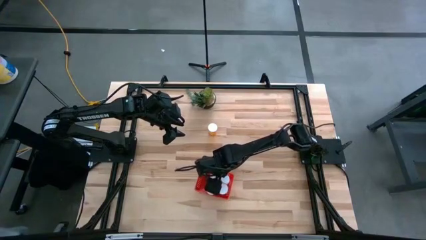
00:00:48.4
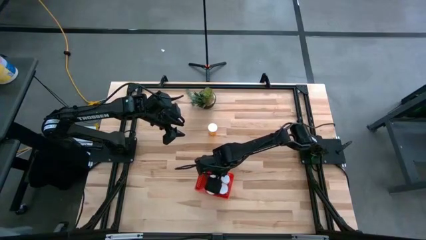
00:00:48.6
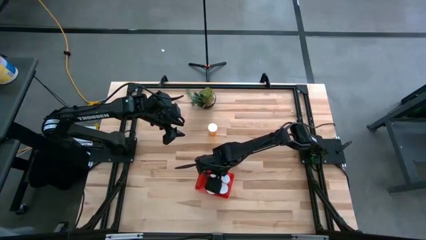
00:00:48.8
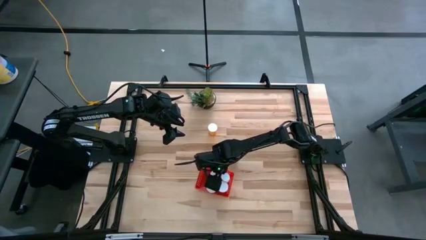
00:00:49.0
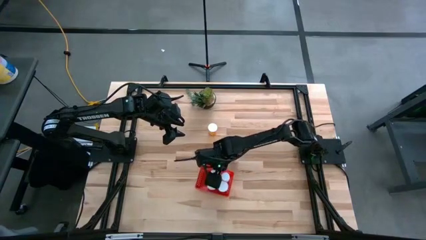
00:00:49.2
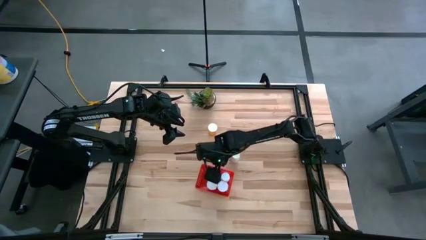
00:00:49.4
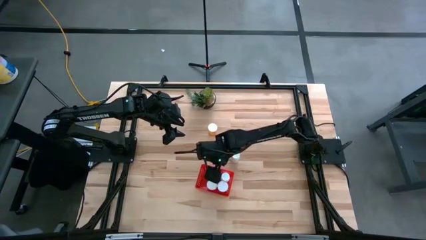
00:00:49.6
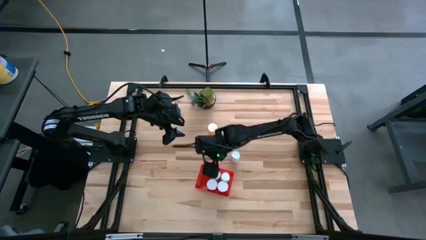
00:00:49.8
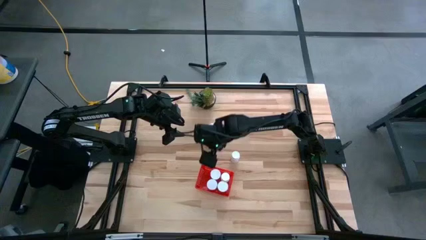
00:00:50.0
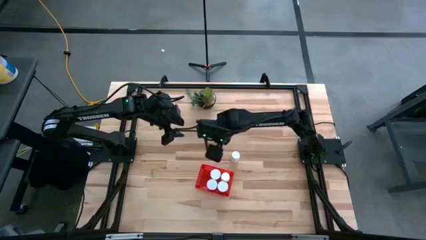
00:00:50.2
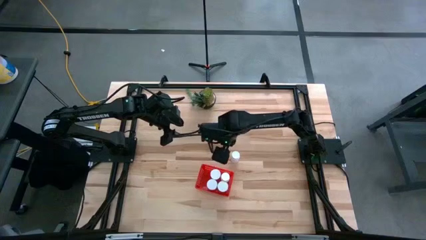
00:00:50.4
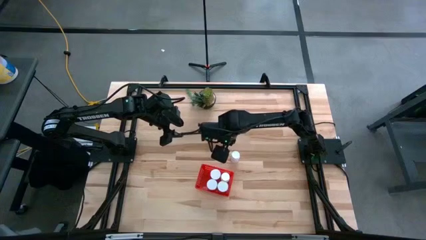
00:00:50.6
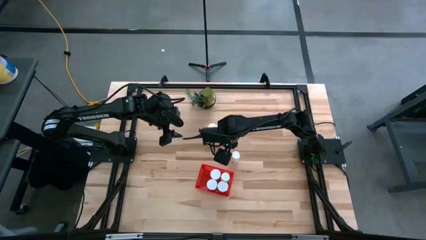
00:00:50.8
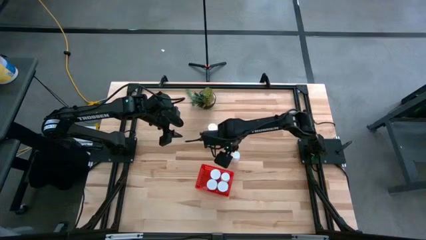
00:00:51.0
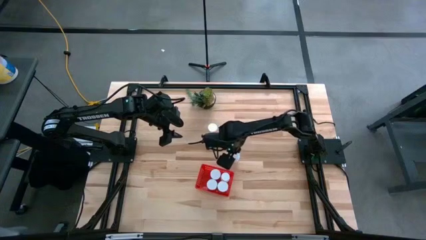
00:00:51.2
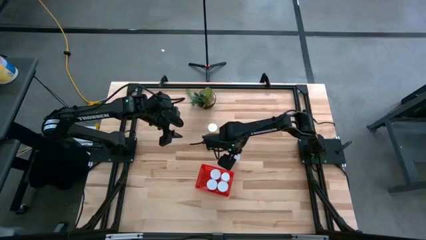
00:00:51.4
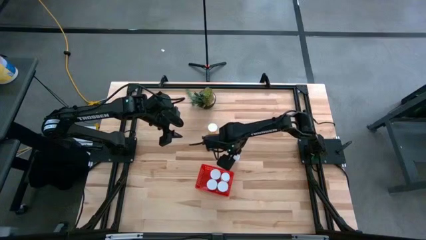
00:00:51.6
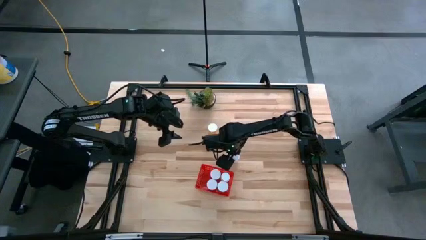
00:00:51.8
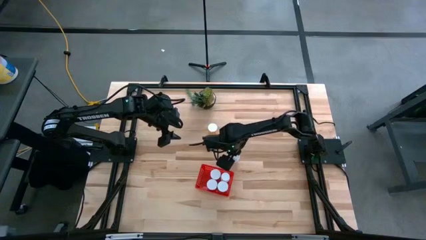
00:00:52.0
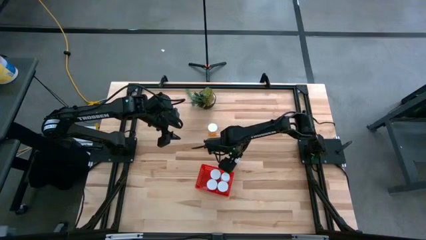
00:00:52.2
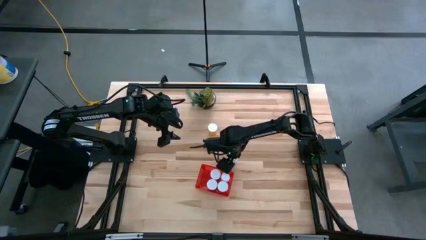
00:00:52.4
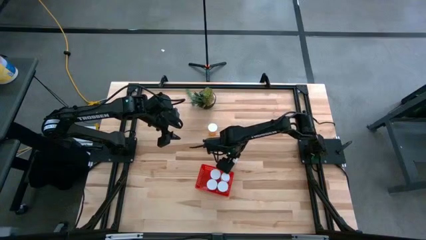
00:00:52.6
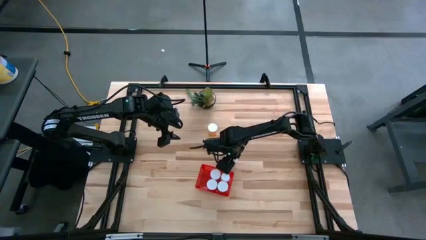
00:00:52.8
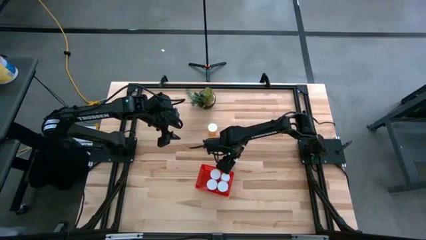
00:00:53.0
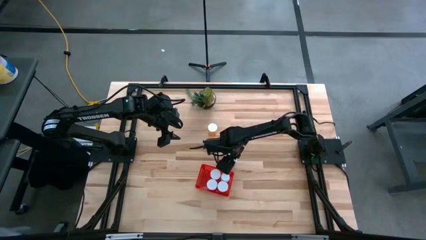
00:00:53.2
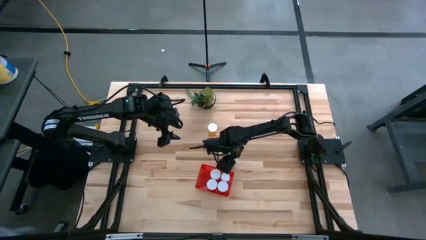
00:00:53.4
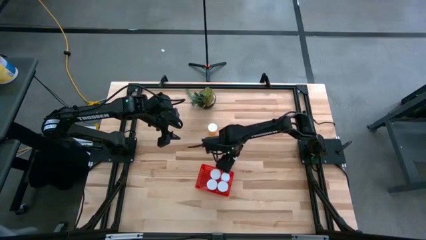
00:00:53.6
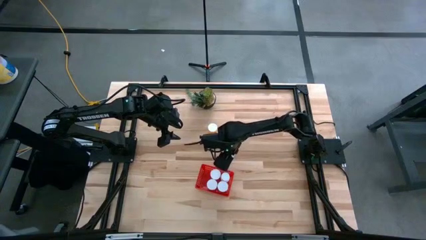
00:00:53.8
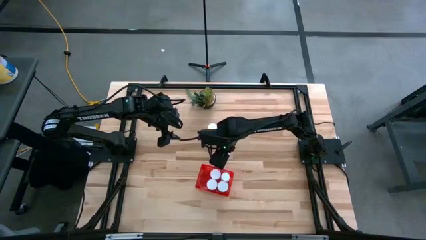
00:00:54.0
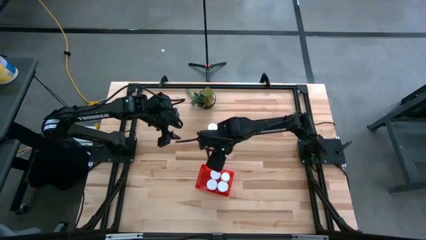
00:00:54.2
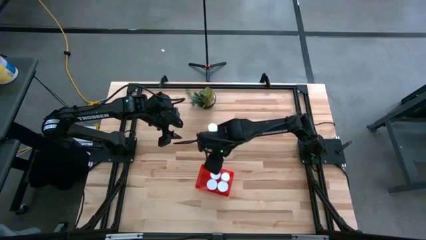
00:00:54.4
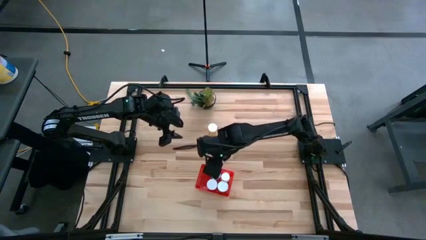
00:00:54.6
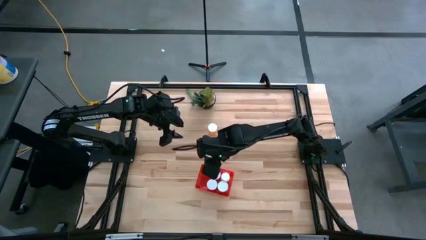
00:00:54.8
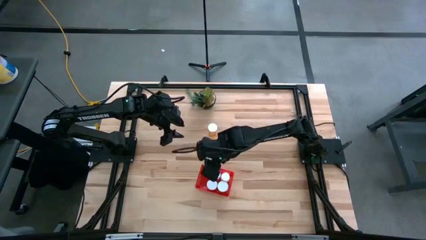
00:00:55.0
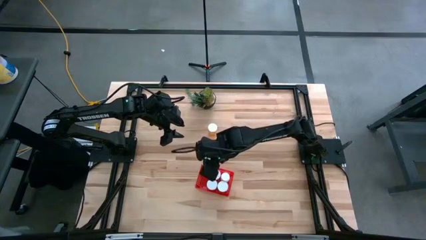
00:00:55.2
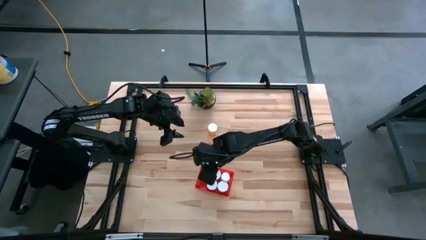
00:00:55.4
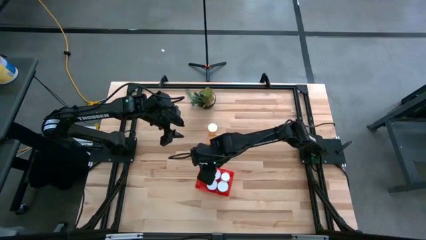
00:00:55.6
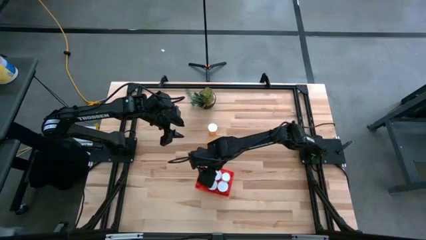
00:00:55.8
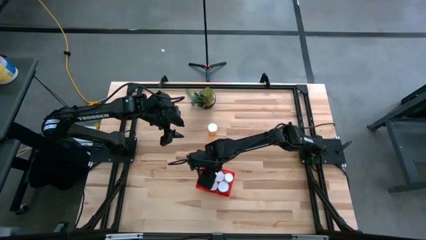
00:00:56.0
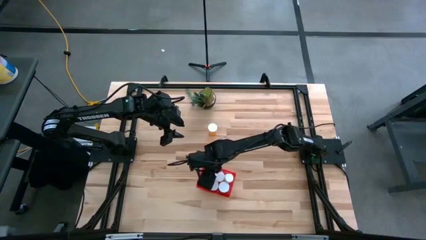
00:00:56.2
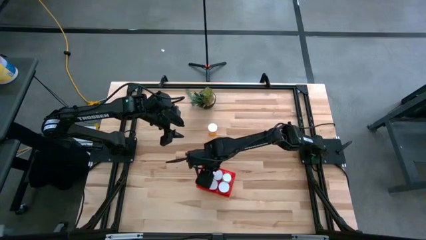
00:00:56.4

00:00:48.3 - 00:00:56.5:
Task: Pick and place pill bottles into a basket
Put the white pill bottle into the basket

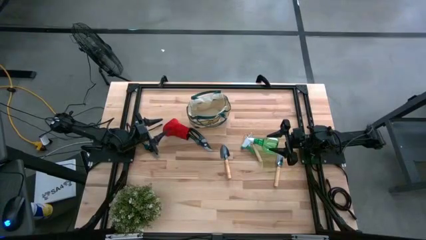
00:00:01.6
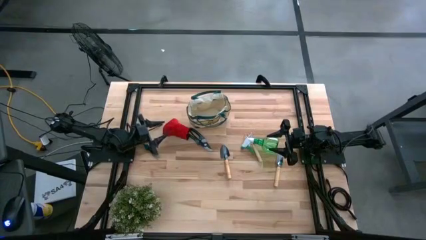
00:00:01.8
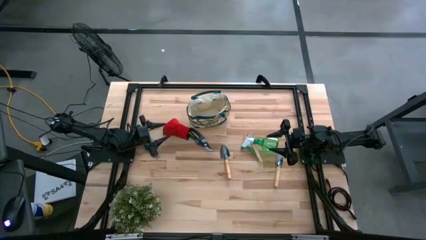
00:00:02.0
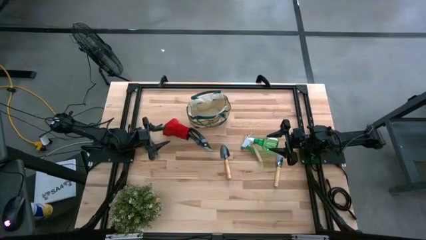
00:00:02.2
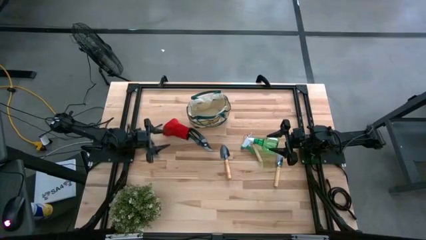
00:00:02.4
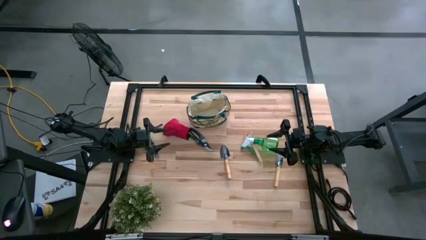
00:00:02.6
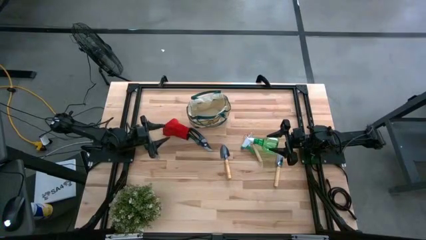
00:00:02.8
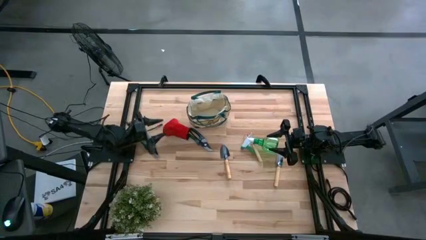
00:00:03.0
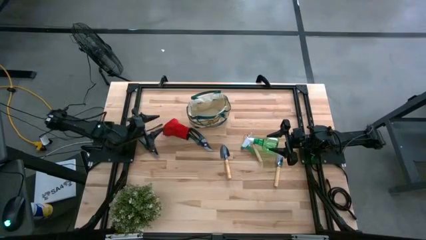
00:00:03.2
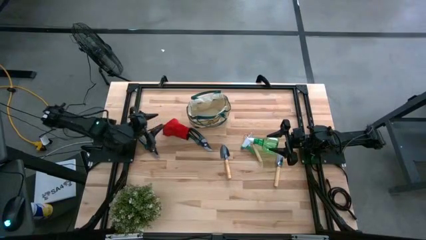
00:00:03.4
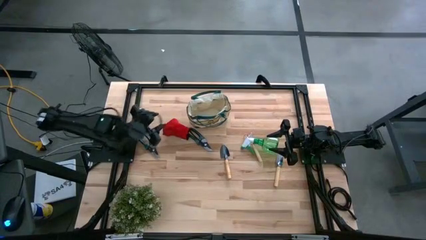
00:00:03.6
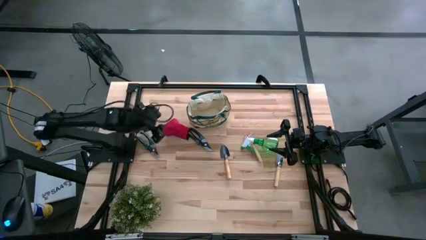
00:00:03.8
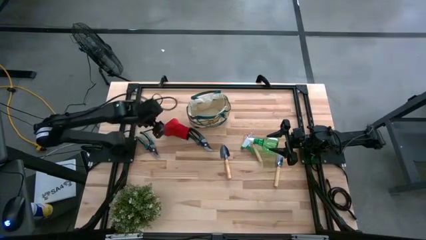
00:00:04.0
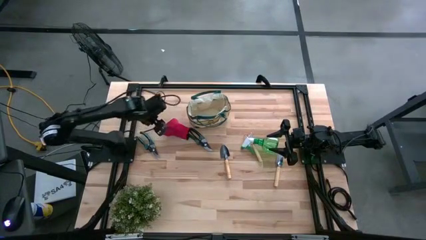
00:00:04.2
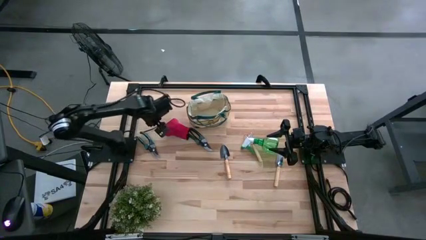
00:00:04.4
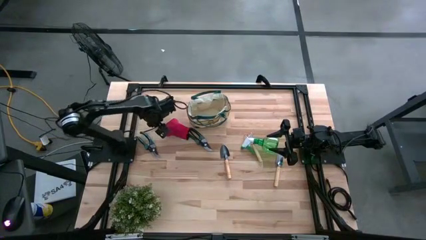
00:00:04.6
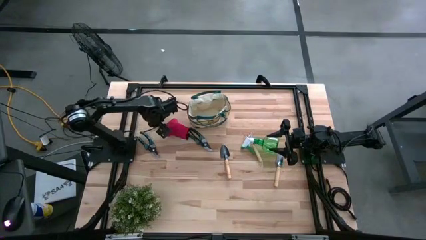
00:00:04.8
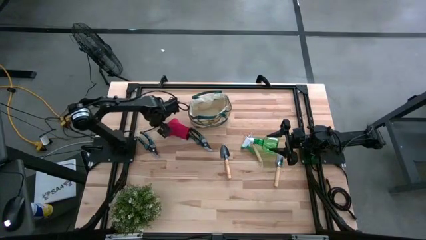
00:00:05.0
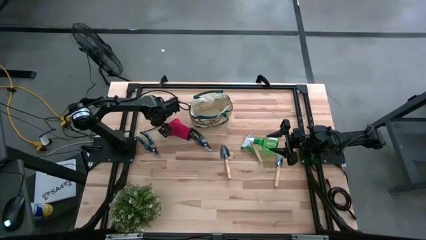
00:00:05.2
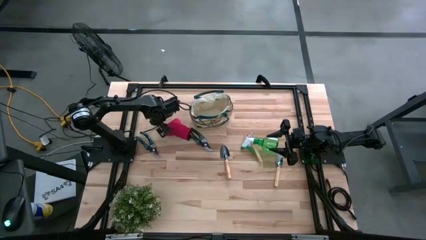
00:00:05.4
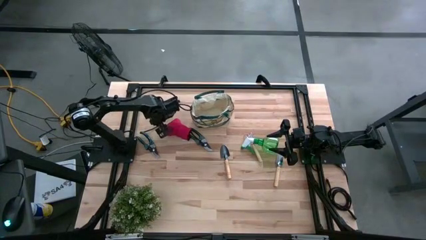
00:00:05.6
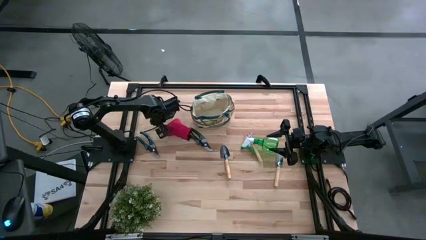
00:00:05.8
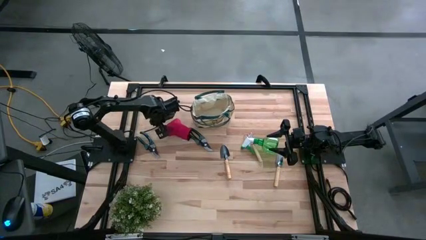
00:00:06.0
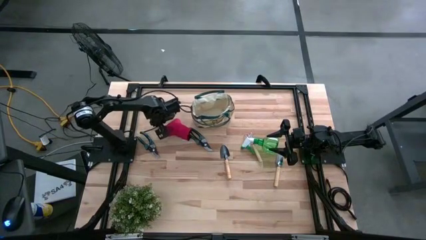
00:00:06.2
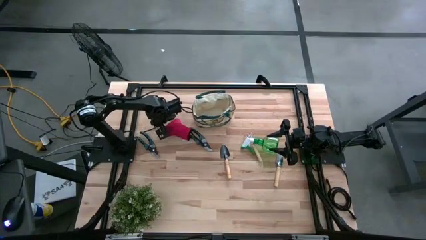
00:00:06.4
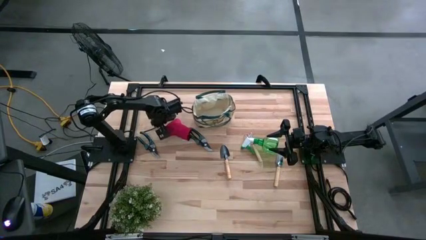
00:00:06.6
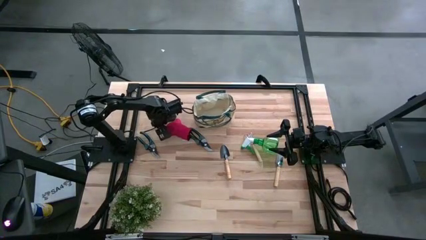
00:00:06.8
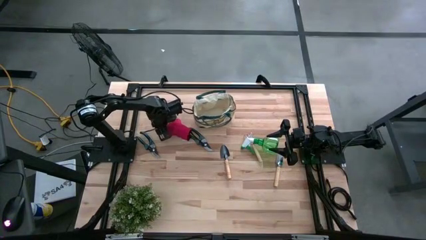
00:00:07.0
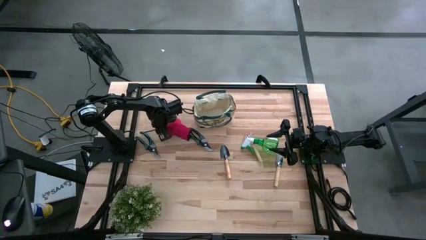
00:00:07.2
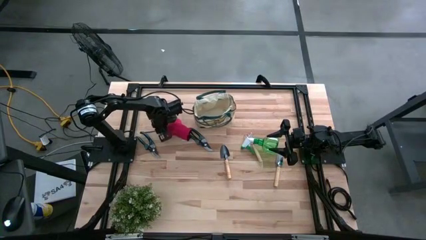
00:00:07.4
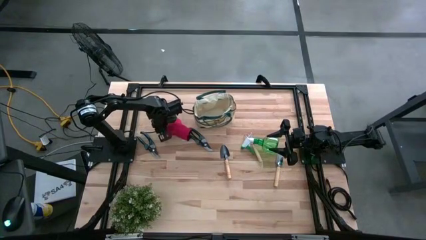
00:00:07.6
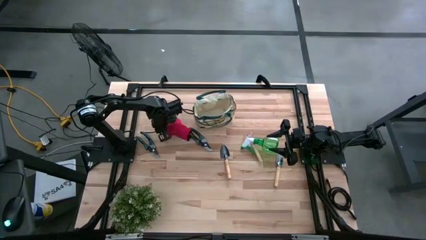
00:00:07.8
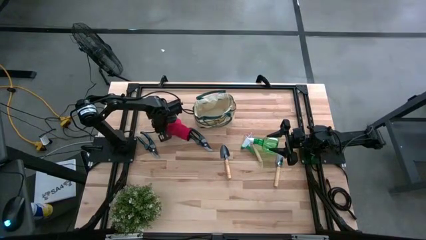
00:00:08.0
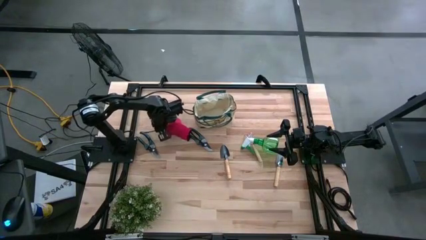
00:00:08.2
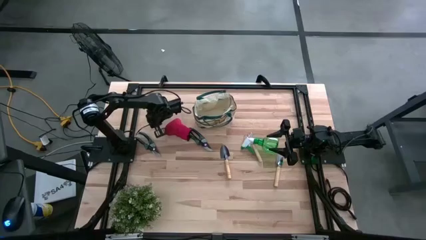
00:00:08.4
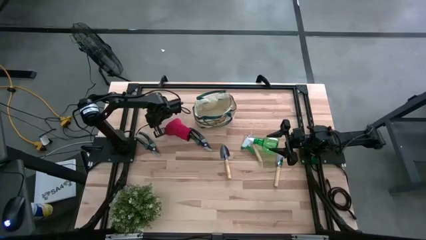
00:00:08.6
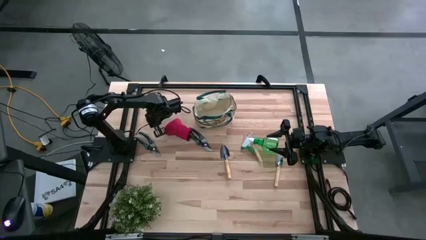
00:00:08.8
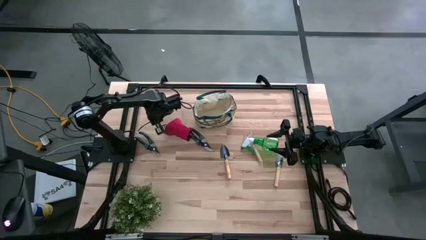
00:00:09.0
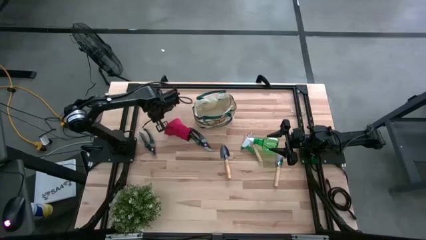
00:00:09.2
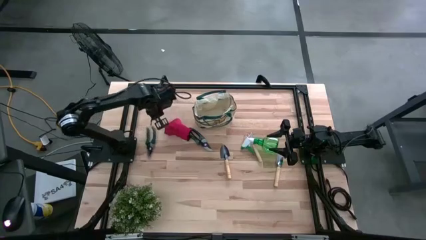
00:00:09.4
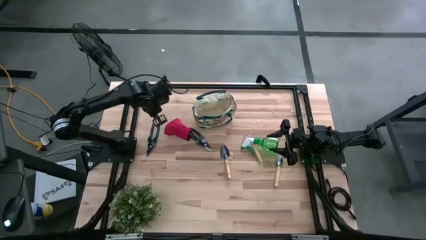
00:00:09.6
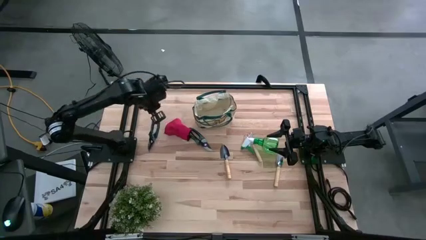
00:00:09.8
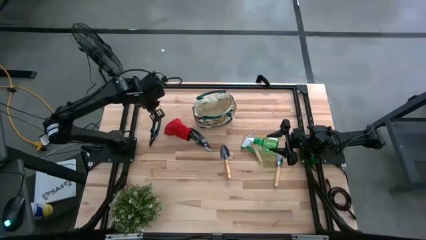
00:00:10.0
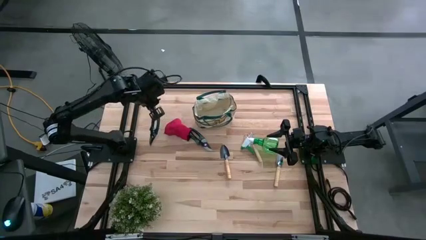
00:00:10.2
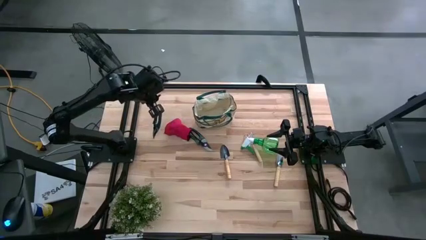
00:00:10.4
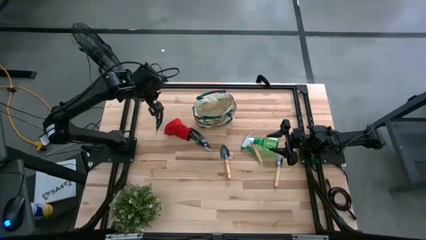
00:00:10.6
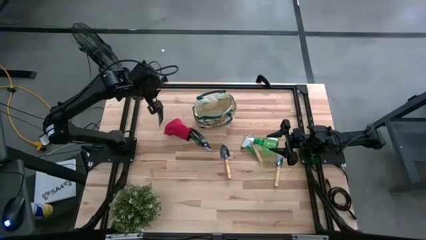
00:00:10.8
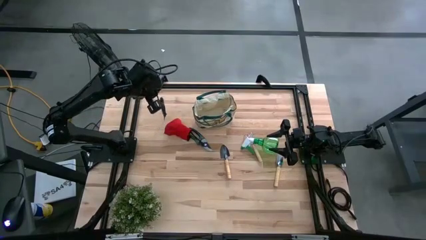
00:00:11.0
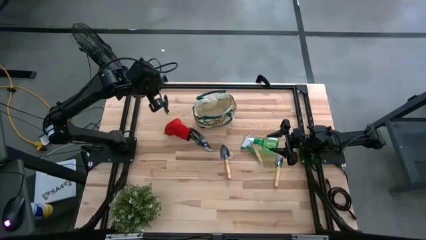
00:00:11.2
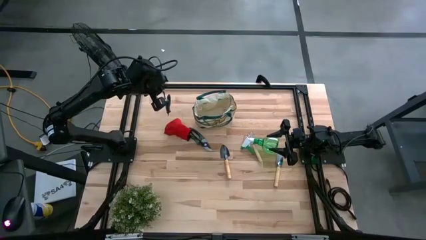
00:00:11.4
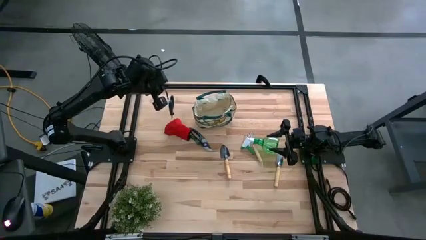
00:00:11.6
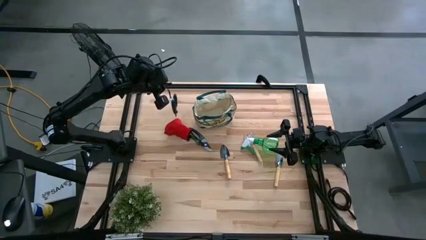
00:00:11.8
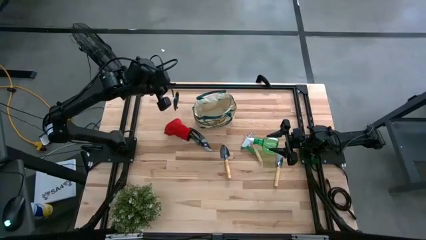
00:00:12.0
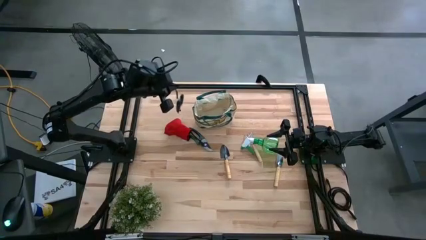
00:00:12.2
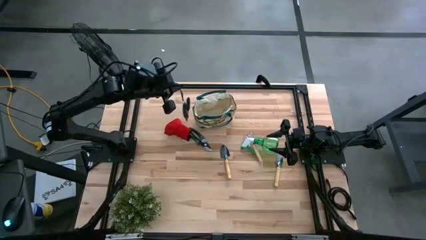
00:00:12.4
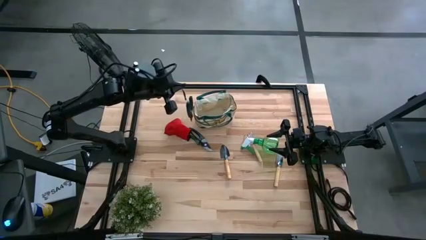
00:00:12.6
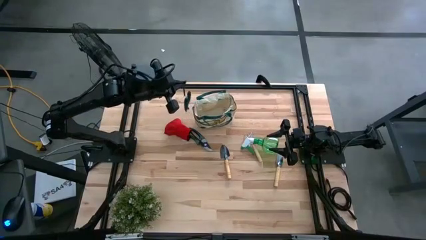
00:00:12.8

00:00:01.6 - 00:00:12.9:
Task: Pick & Place Garden tools in Gardening bag
Put the left green shear scissors into the gardening bag
